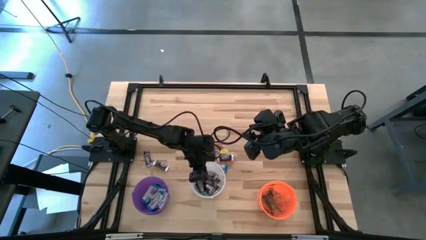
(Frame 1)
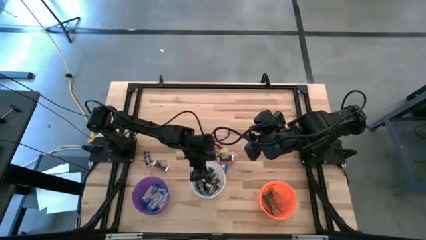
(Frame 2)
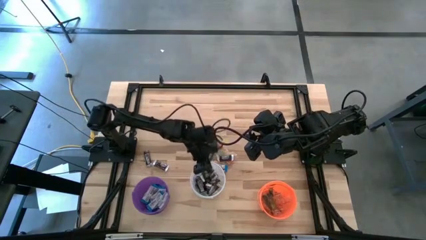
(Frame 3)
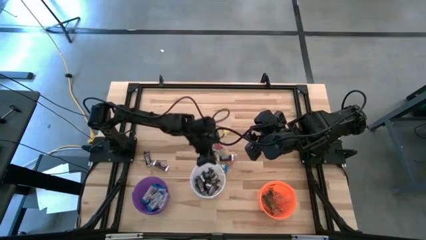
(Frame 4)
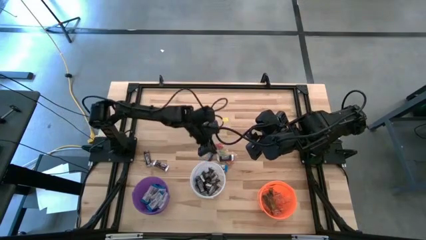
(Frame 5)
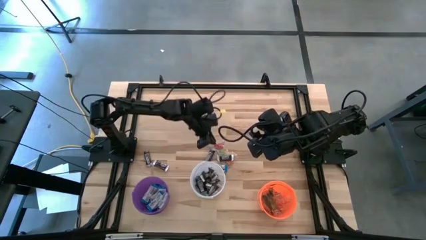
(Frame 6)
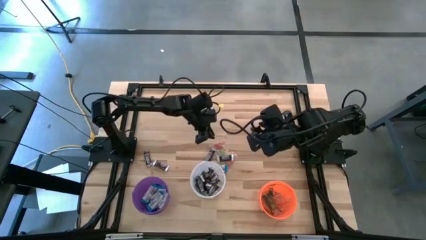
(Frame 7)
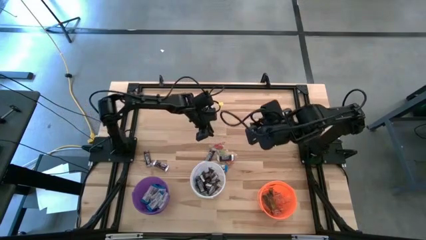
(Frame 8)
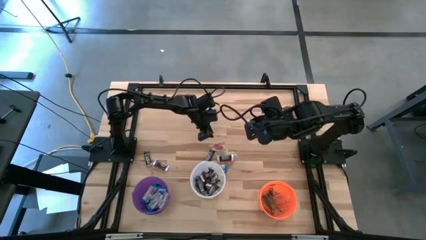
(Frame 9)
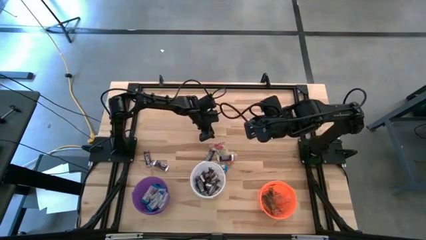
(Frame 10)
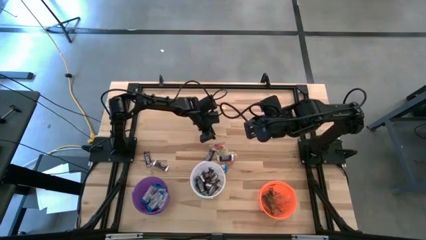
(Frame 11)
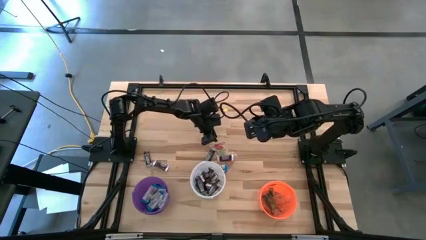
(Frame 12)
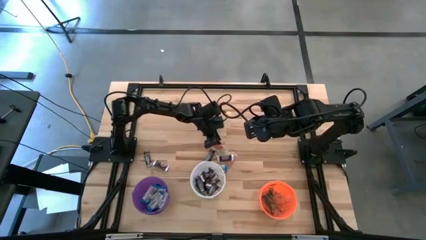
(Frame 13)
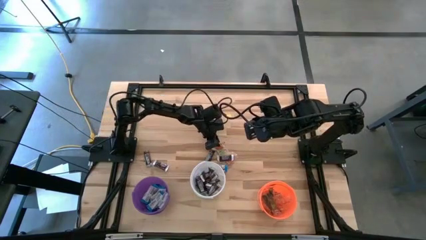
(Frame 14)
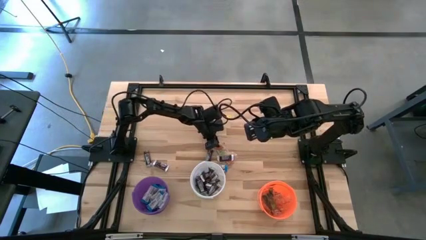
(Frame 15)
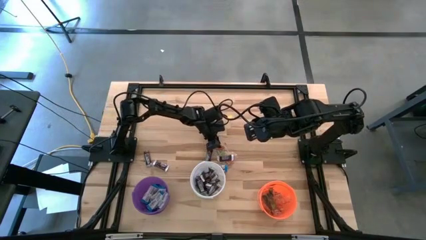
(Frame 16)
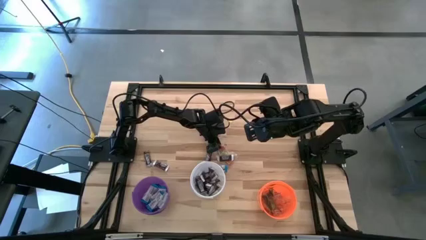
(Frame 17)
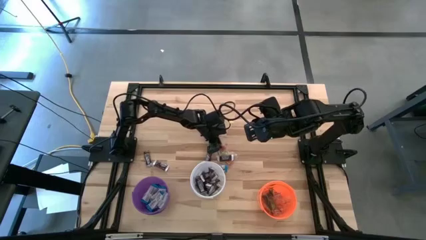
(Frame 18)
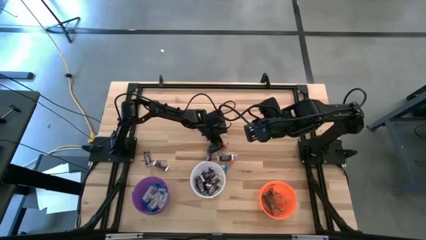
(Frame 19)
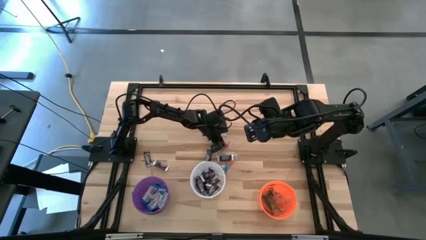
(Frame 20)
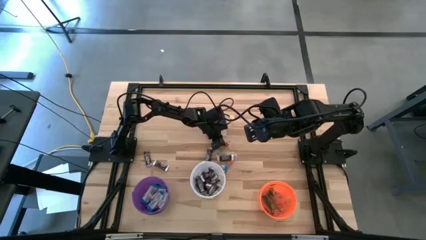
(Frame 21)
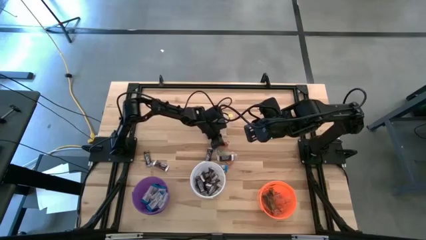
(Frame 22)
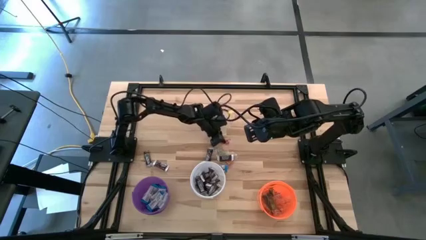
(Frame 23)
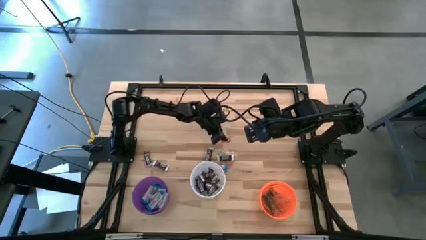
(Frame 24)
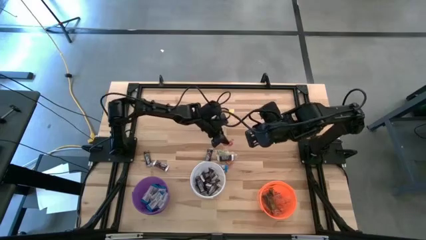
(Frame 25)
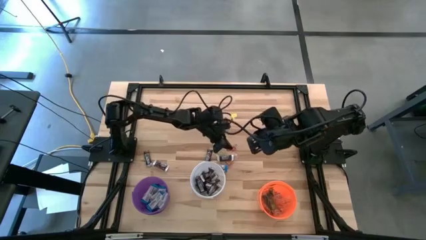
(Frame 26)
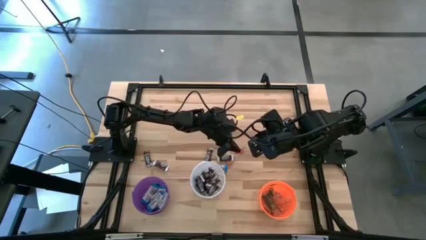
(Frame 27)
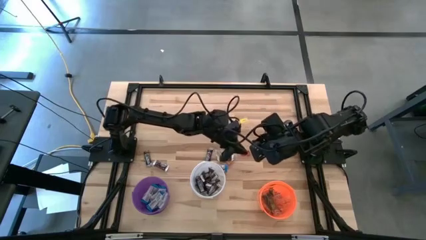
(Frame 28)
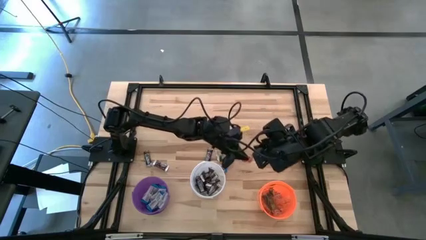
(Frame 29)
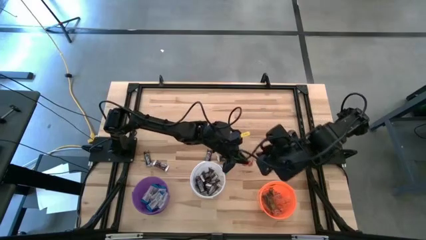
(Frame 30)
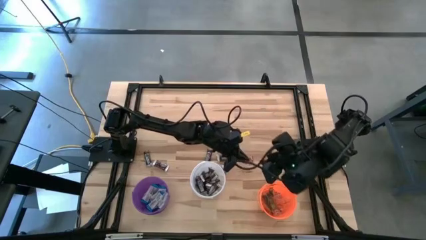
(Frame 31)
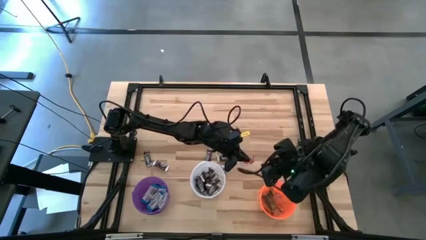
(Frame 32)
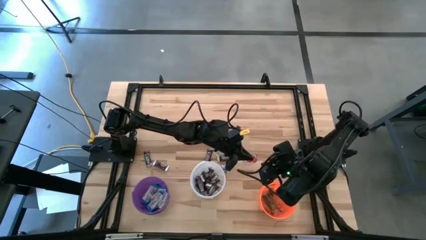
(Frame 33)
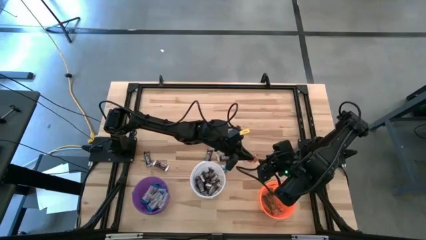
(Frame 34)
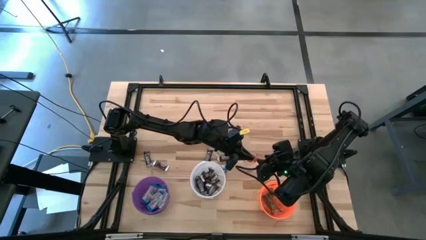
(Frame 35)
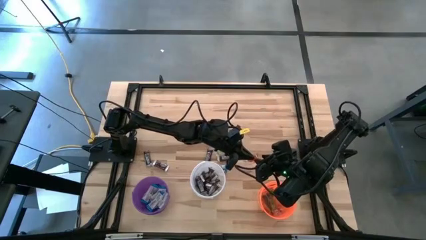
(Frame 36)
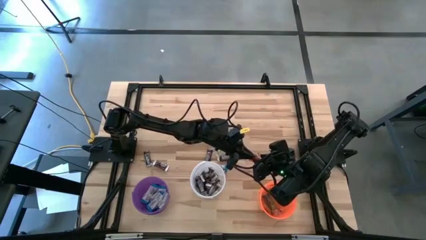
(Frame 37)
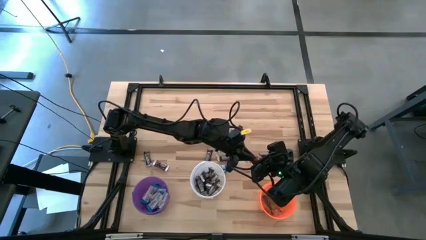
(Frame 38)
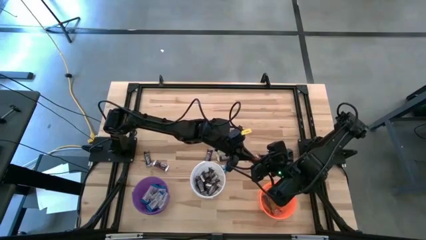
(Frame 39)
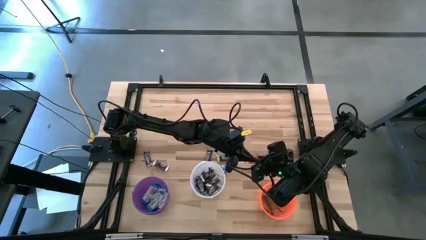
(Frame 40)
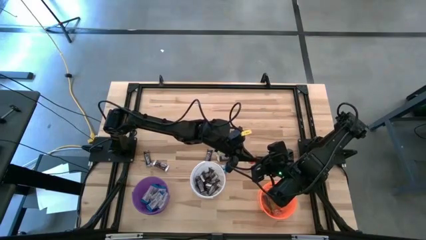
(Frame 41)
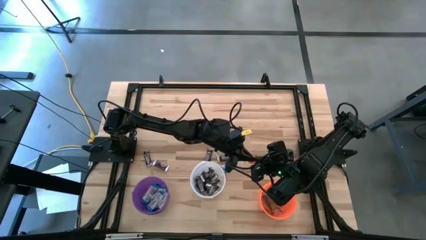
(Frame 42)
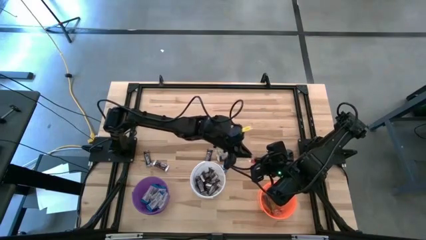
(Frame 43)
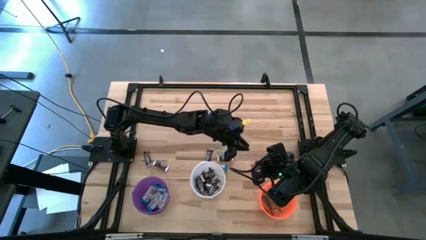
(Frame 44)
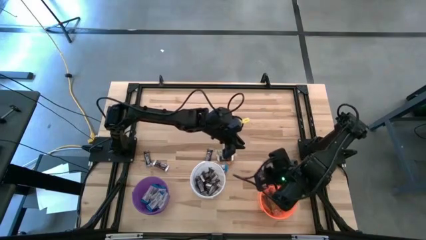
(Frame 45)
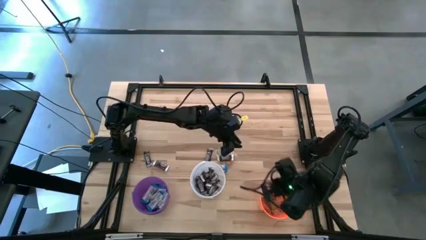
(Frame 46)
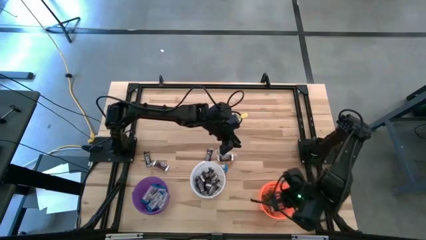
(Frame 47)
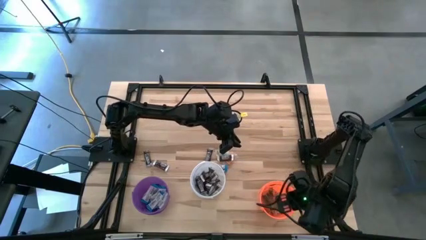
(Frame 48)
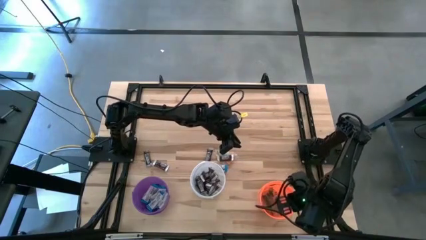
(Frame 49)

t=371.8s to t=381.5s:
Task: Sort candy
Put the red gummy into the orange bucket

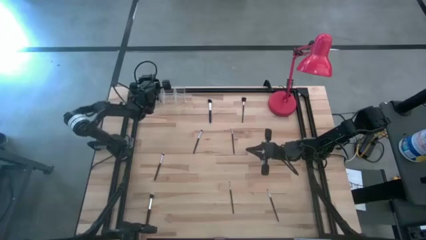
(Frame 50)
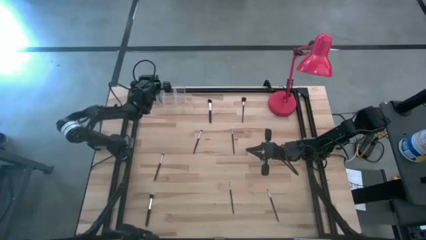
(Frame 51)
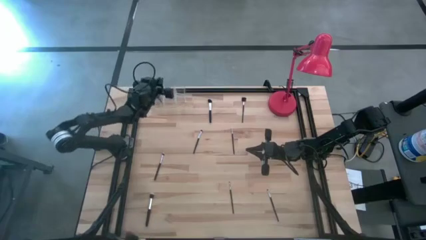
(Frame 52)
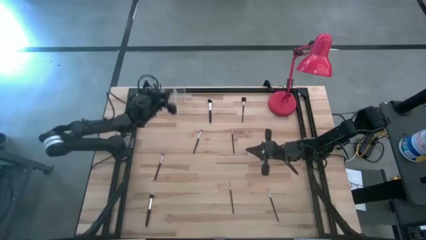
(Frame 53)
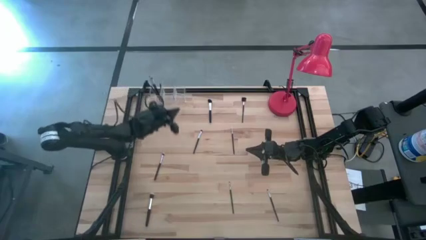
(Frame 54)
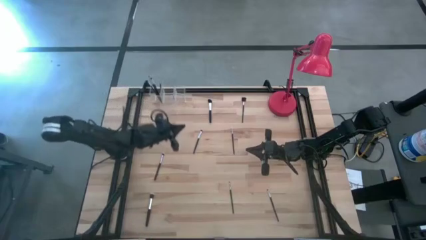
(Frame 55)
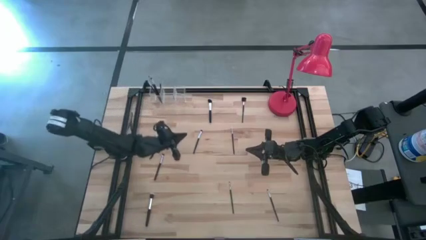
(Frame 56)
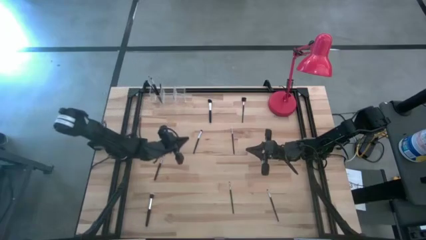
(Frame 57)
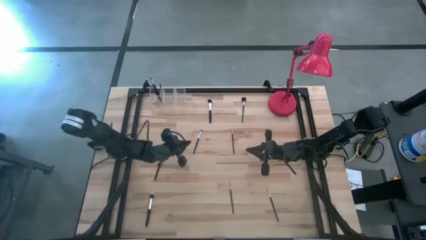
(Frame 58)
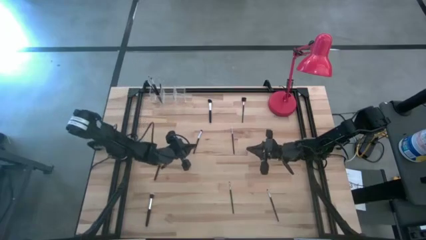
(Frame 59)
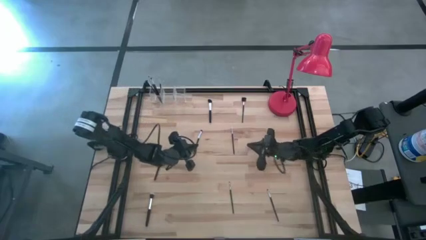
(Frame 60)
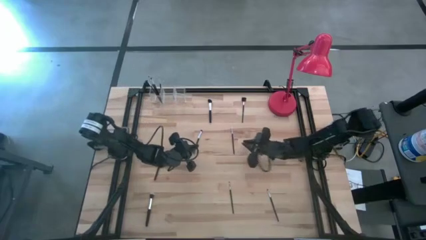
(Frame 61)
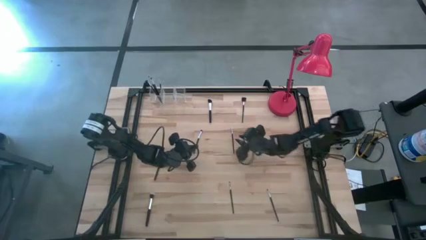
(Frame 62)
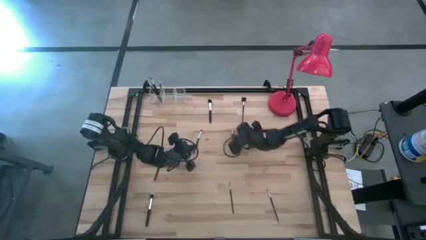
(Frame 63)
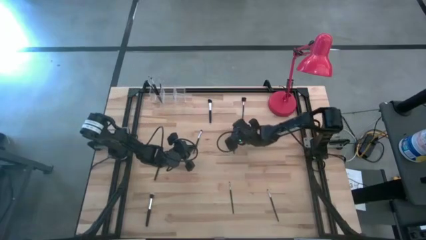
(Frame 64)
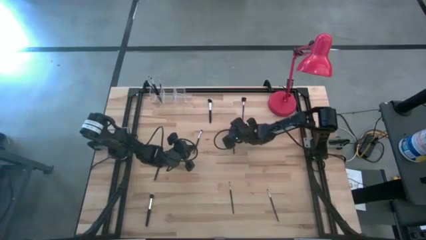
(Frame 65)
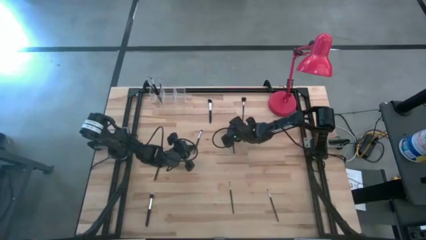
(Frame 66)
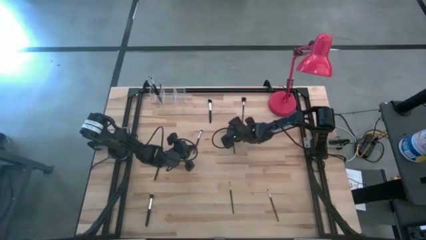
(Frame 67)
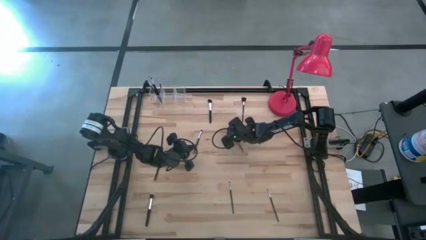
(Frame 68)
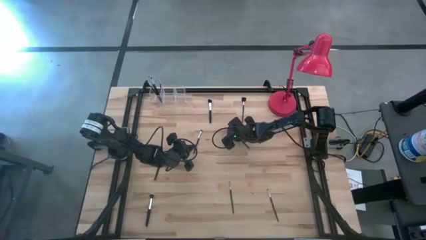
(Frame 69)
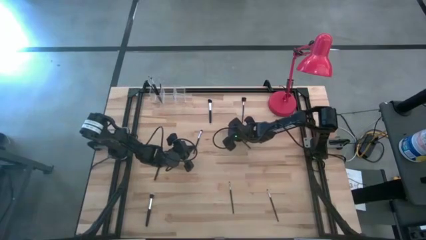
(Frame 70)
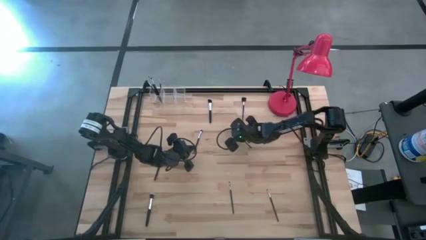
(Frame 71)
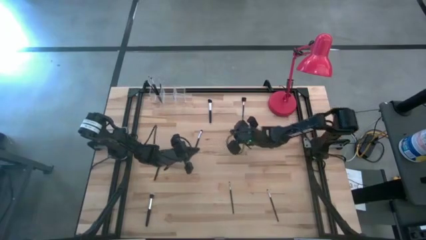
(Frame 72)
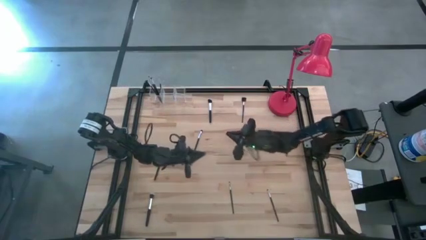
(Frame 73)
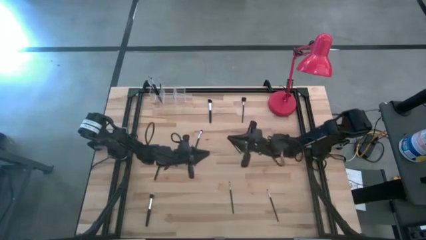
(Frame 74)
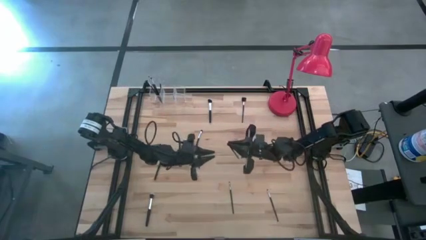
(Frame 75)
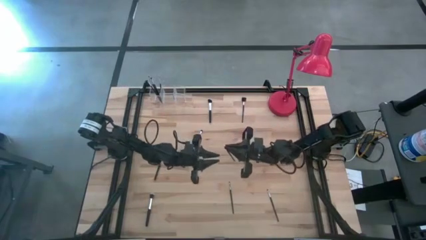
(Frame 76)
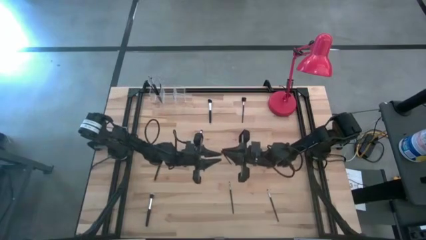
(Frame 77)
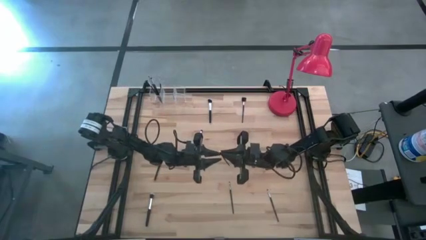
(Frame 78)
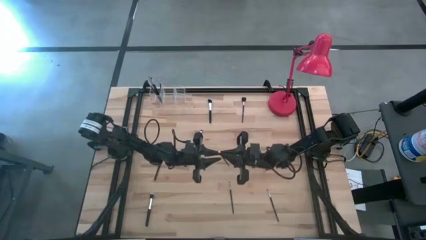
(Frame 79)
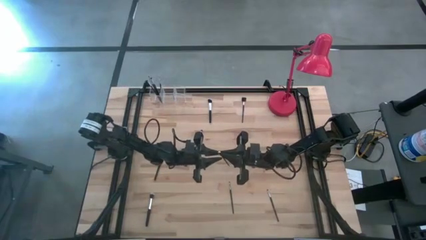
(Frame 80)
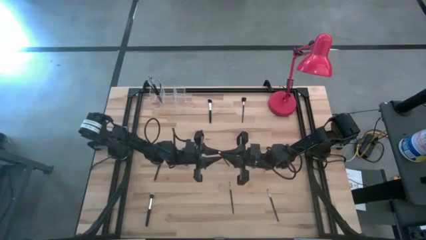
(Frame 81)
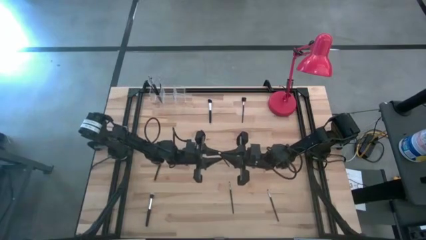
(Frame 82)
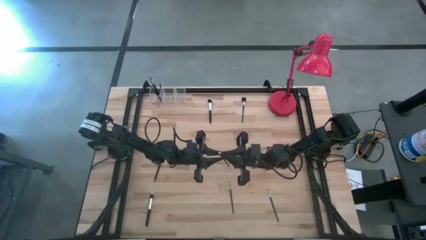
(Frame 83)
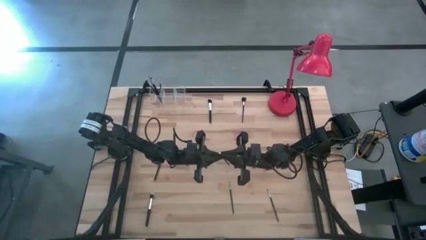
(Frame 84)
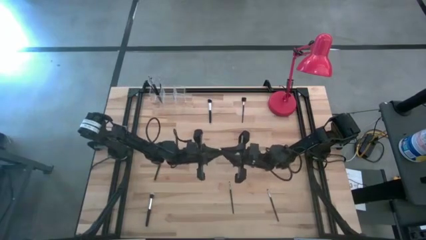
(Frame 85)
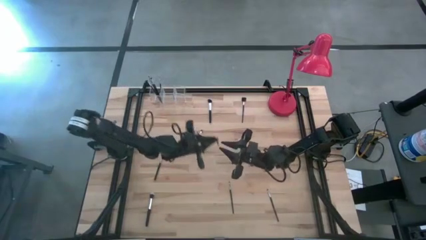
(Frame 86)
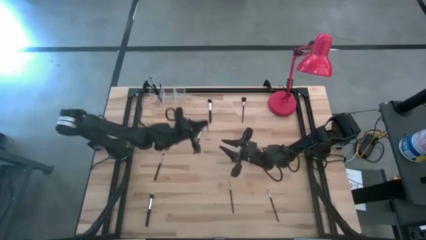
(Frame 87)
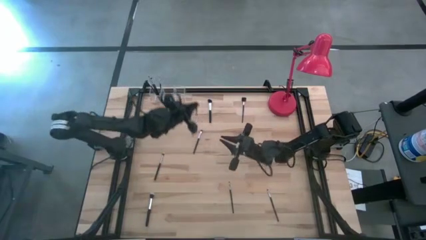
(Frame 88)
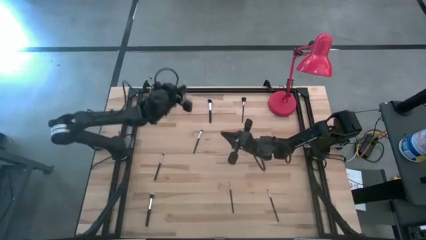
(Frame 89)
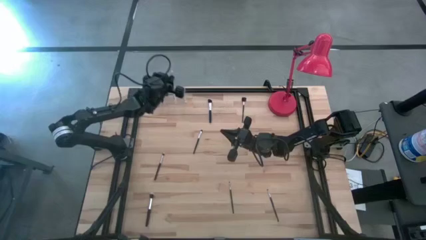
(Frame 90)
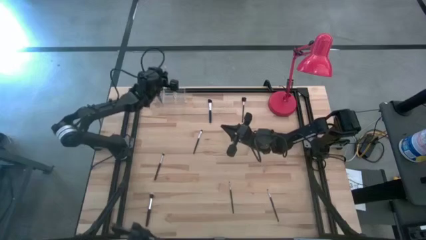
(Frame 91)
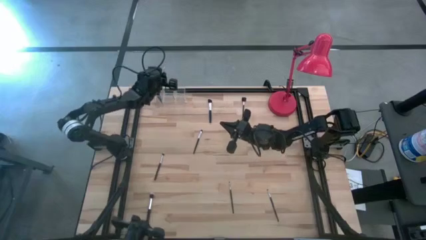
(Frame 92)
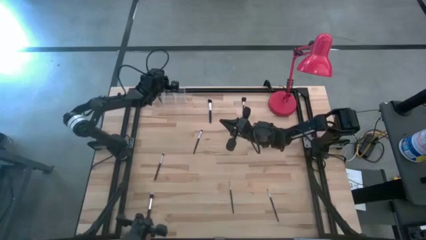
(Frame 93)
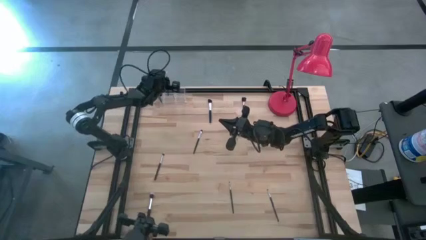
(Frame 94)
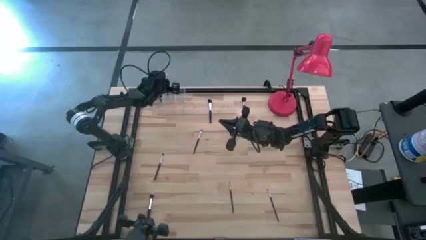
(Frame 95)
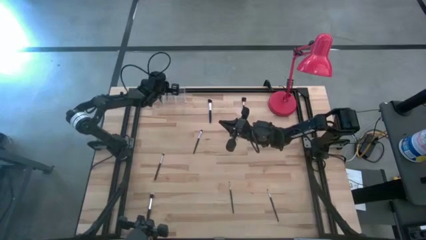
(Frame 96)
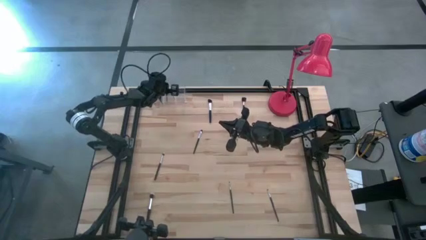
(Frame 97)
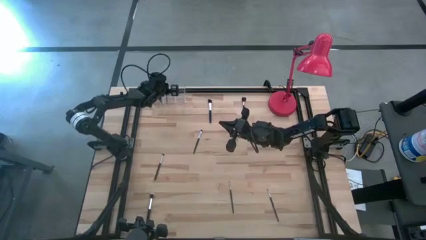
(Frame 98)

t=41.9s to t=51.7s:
Task: Pick & Place Makeup Brushes
Put the lip brush into the transparent organizer
